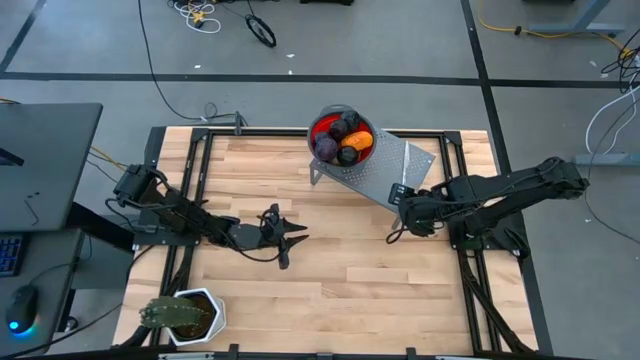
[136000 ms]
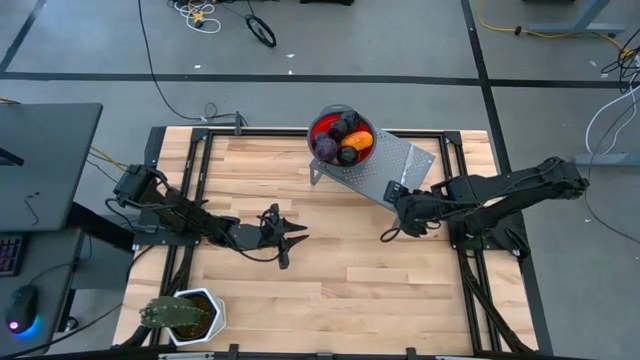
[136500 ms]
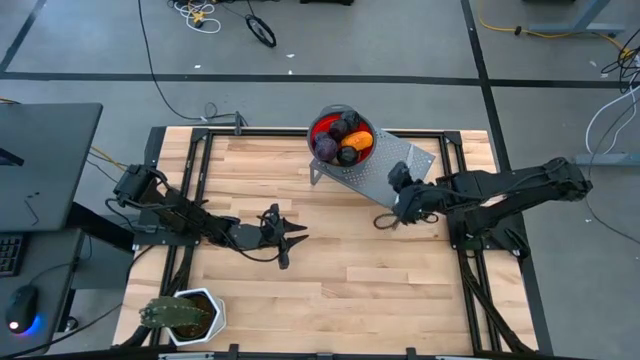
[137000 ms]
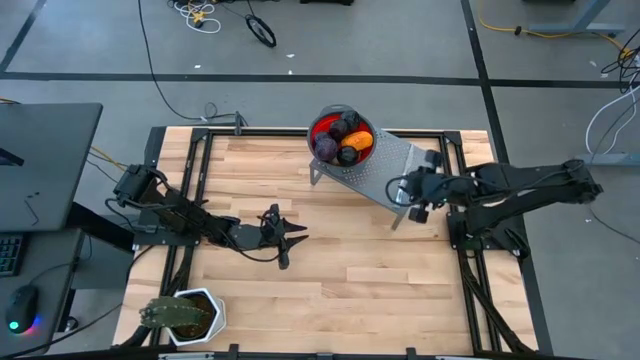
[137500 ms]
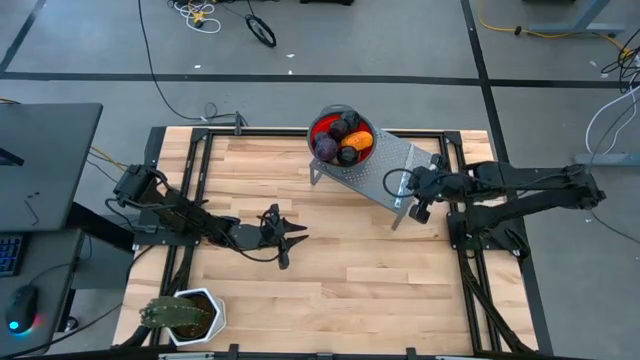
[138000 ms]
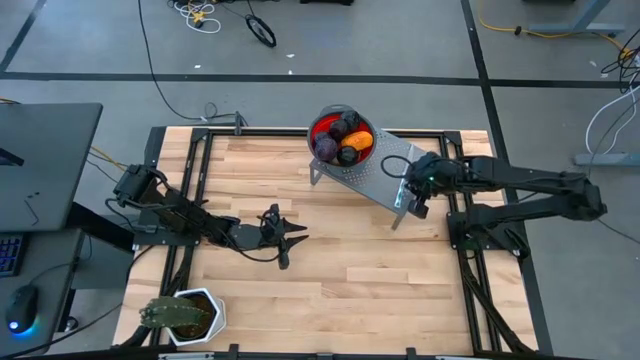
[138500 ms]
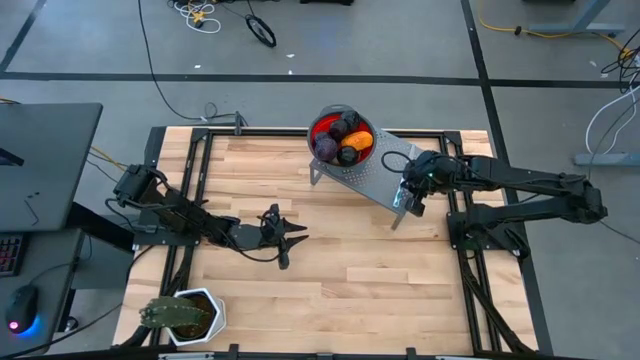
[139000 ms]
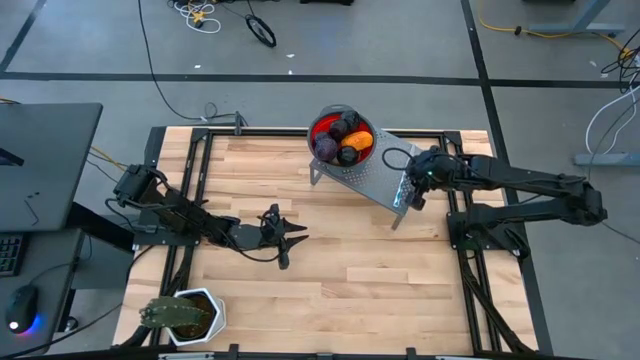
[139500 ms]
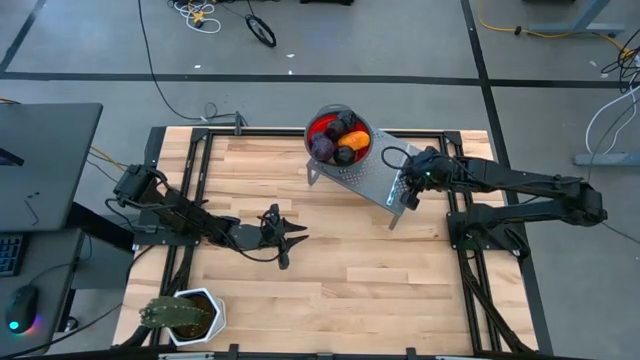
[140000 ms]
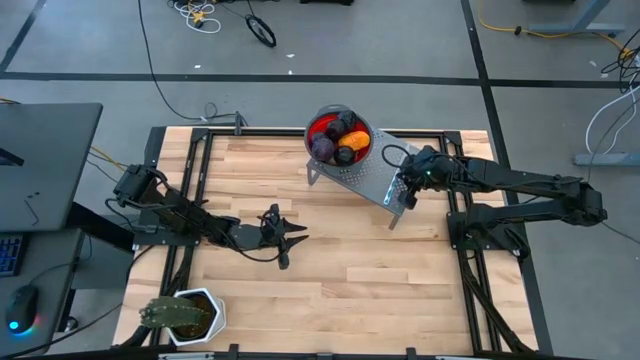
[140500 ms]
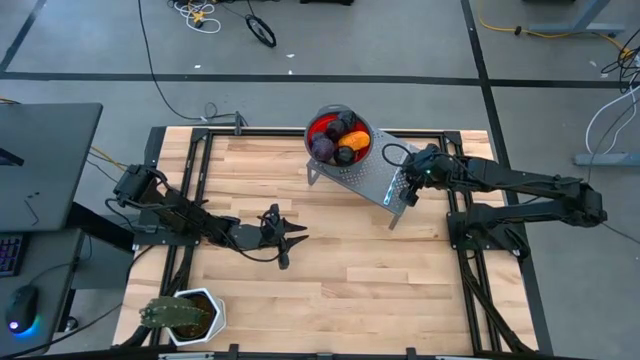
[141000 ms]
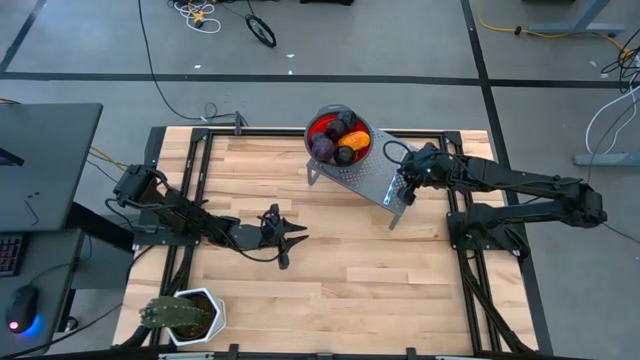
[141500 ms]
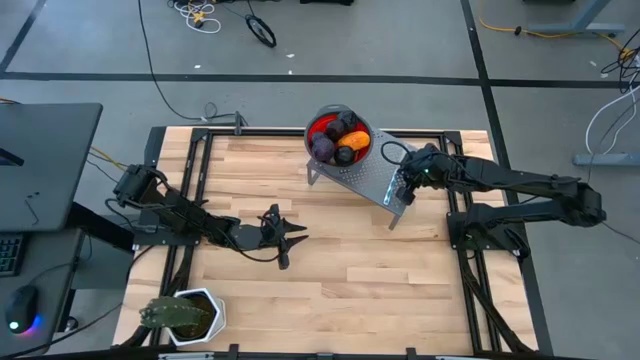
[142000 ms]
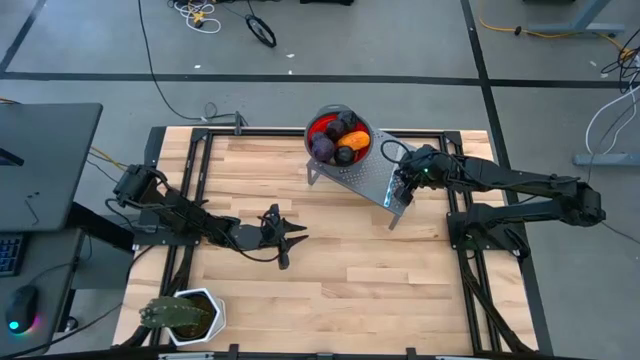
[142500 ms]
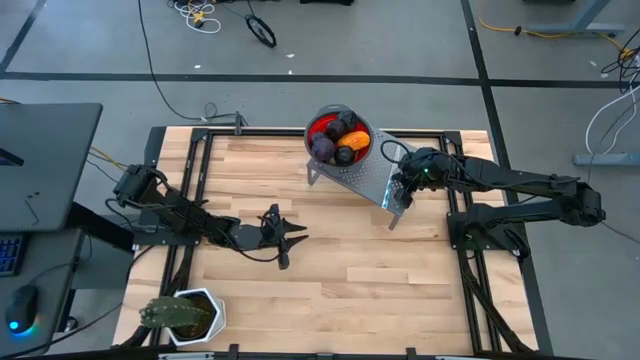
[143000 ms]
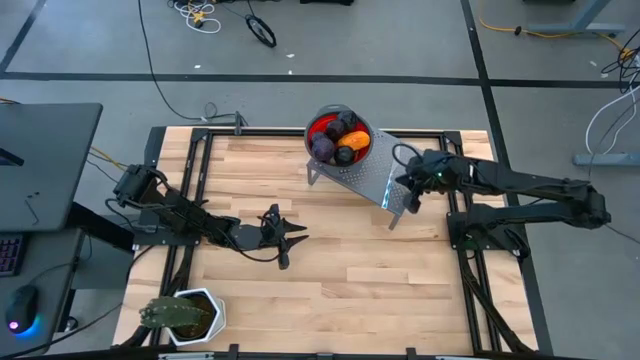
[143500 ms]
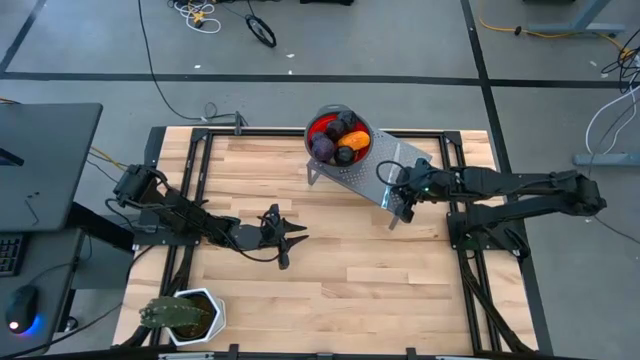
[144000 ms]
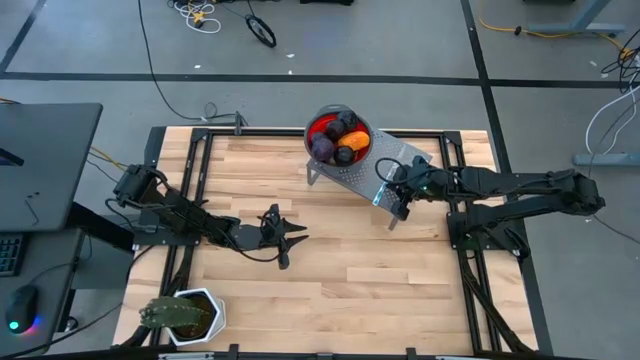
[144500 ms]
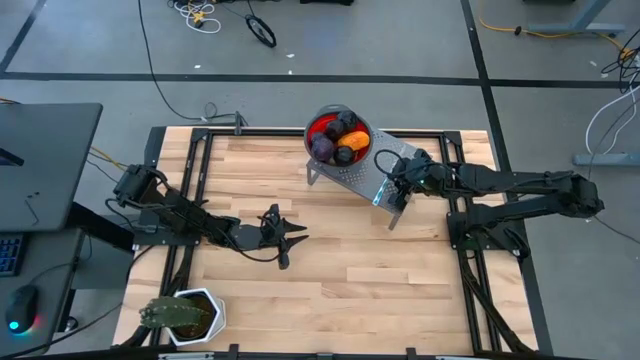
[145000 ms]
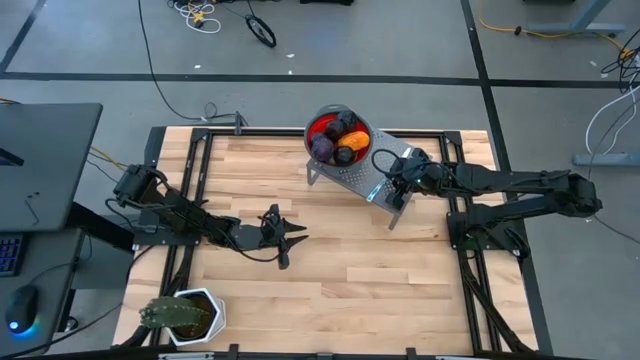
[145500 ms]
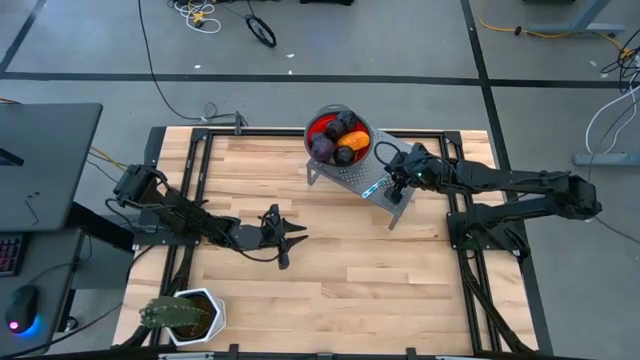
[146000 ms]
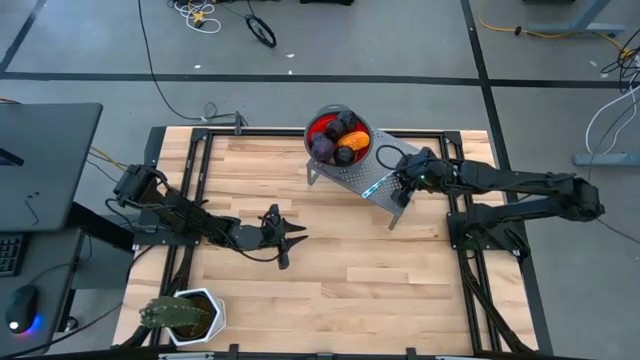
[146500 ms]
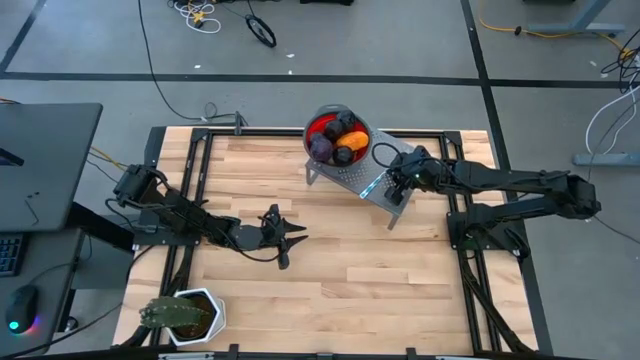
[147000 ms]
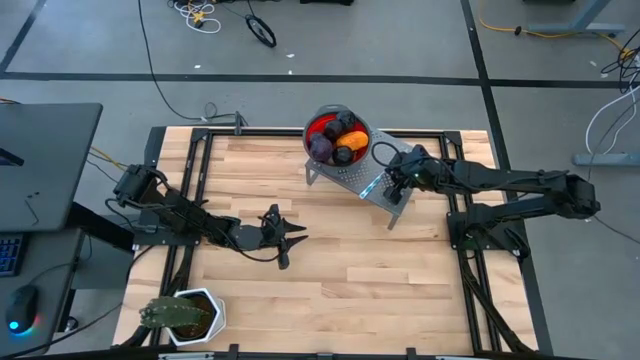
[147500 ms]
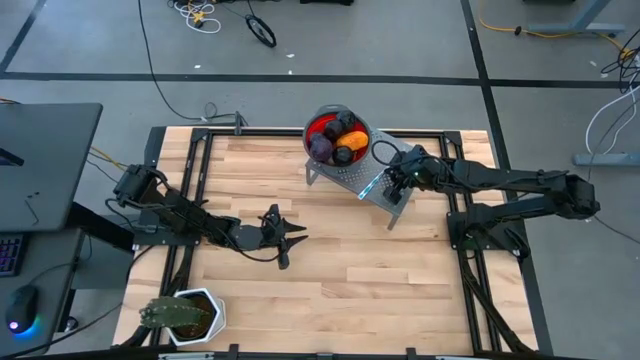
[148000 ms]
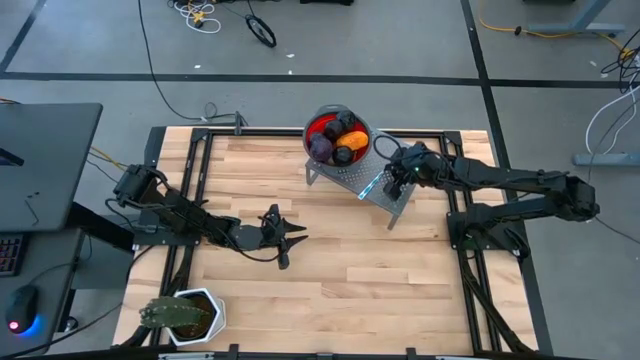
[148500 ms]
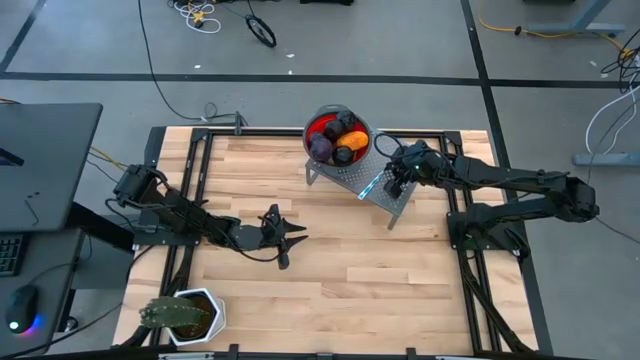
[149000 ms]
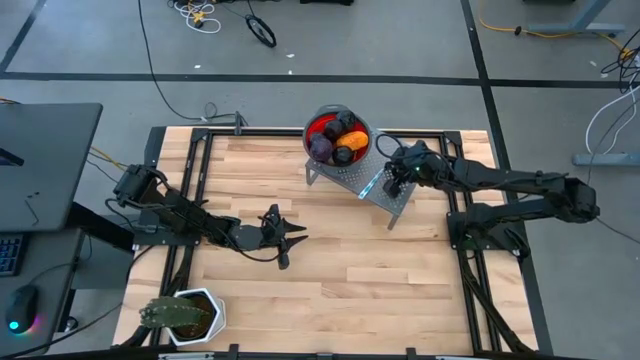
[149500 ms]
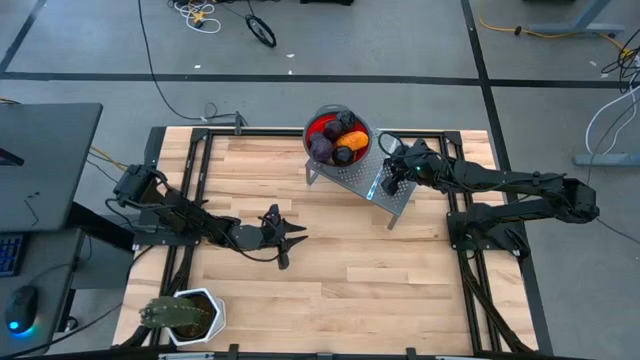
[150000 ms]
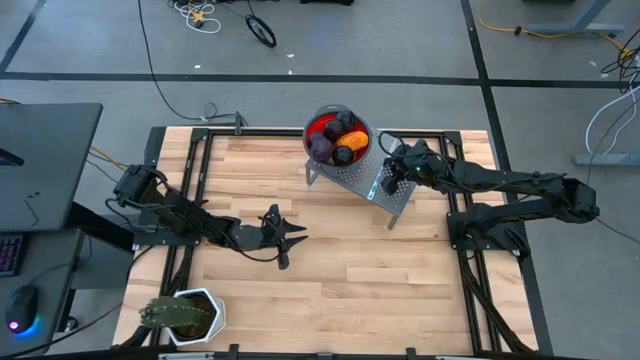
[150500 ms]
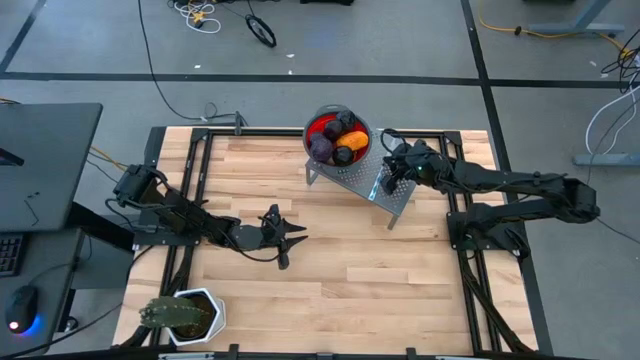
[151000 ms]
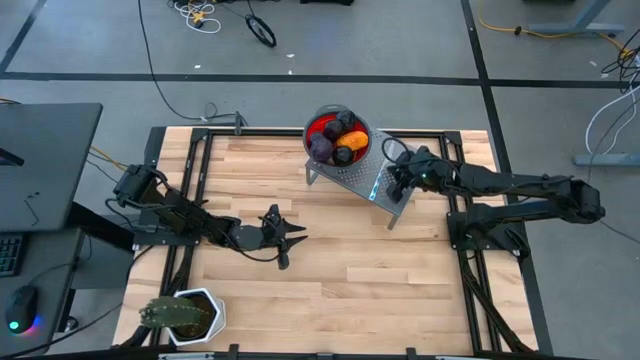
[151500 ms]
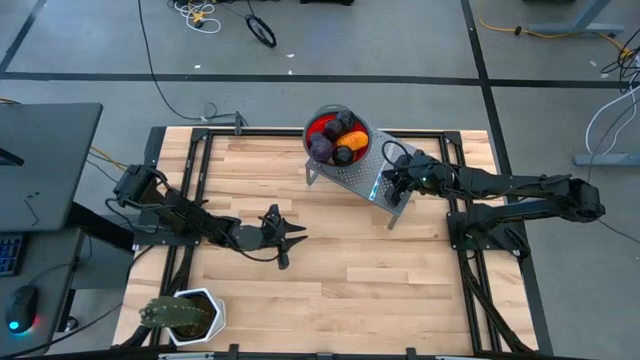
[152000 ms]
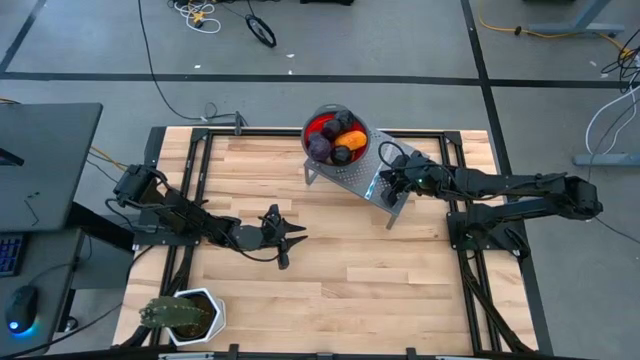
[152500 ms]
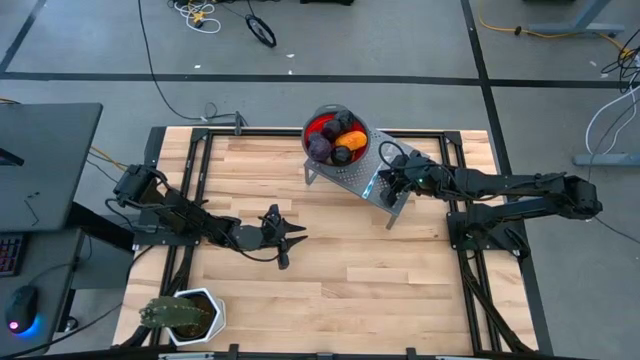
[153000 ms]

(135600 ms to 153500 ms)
Task: Pick & Place Fruit
Put the knife on the shelf

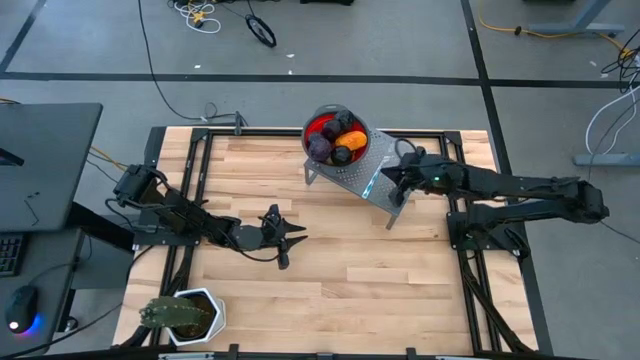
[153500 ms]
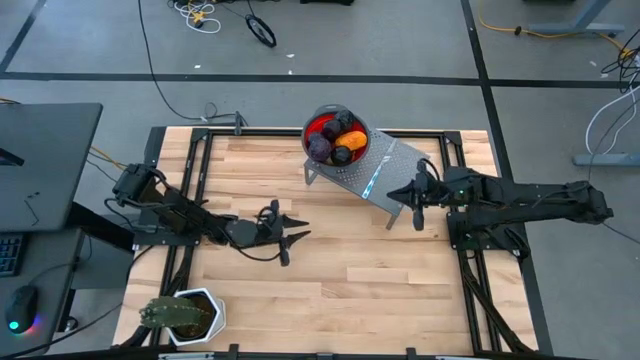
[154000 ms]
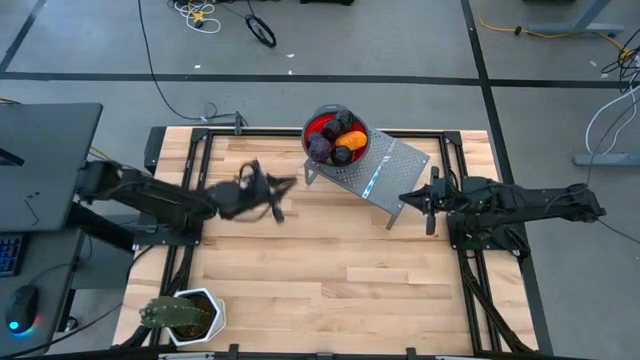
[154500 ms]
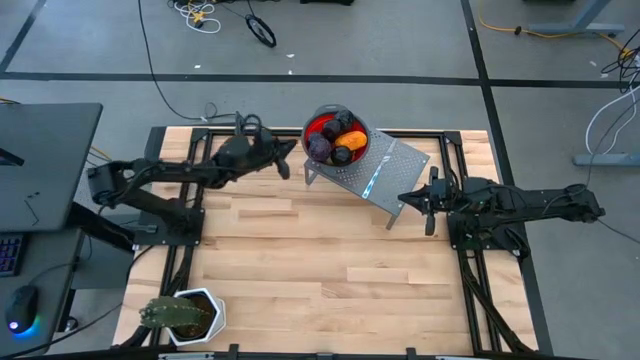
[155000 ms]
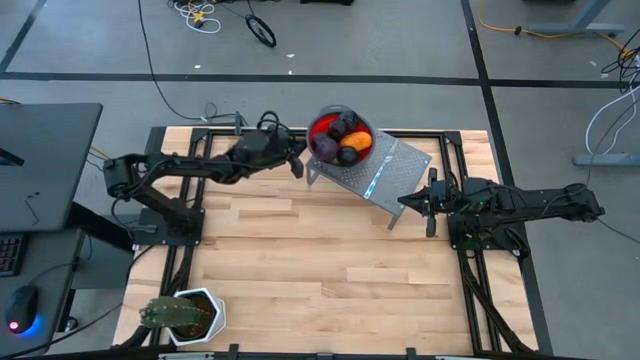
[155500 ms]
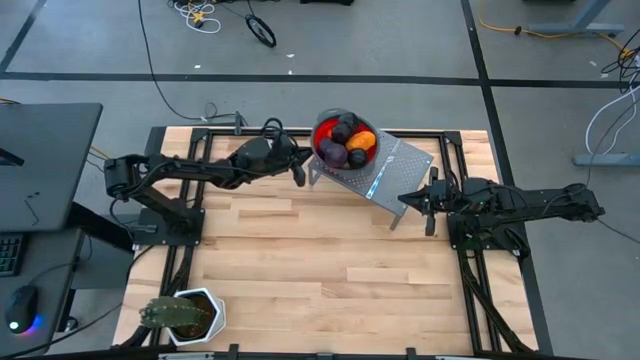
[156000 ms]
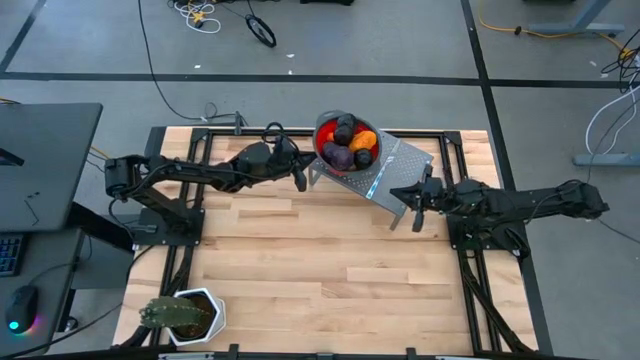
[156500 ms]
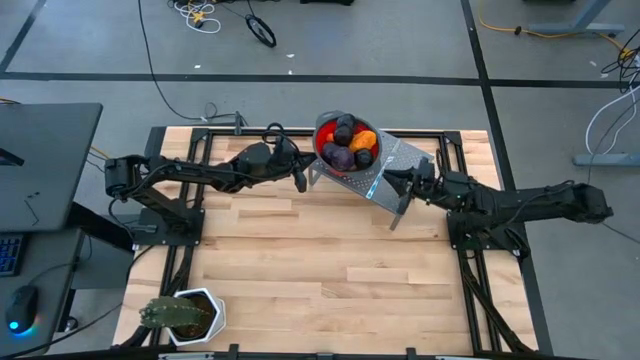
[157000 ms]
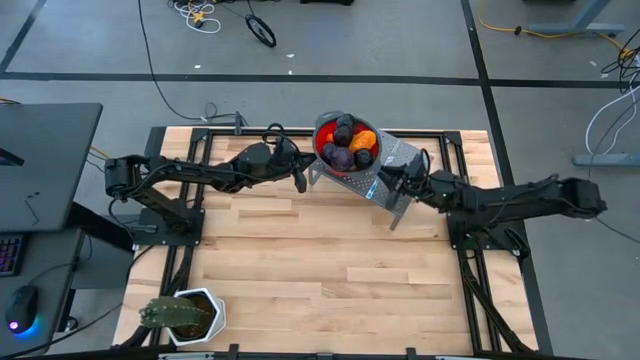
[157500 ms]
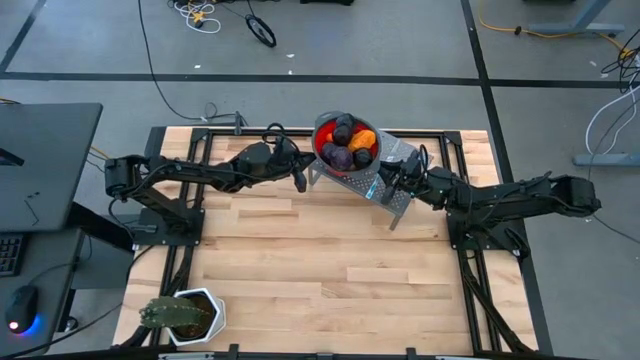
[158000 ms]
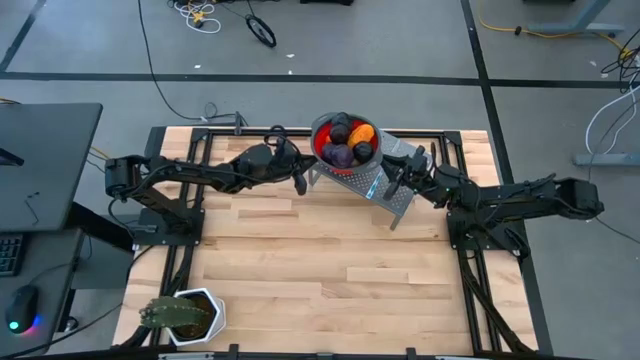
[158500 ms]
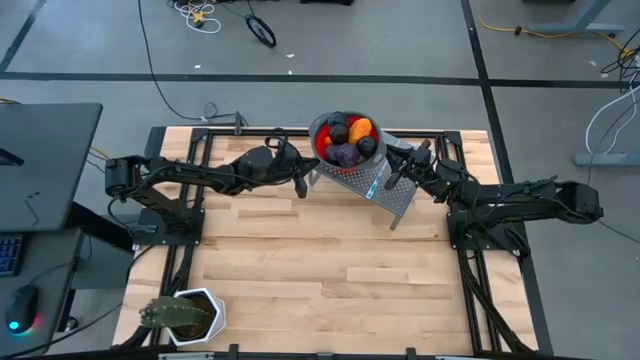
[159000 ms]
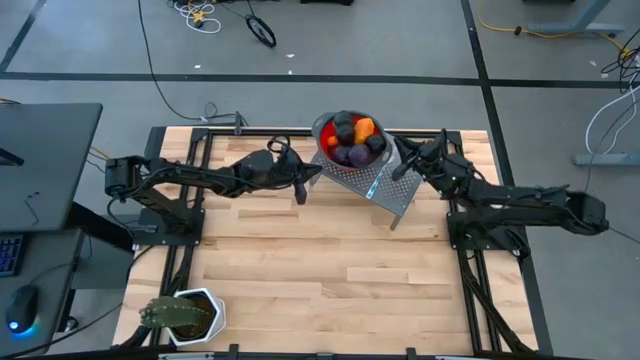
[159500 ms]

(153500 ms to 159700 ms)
Adjust the red strainer bowl
